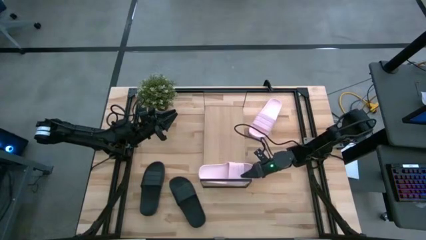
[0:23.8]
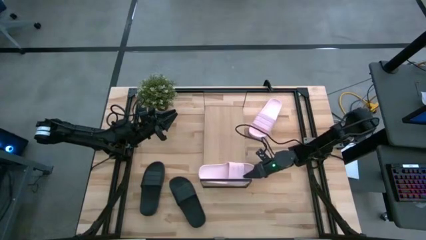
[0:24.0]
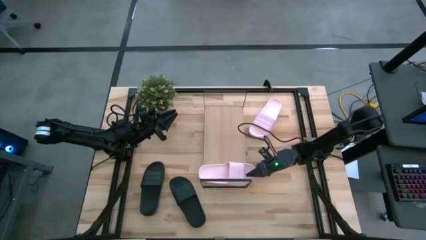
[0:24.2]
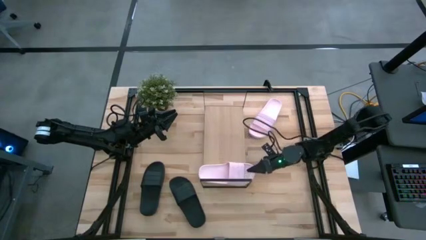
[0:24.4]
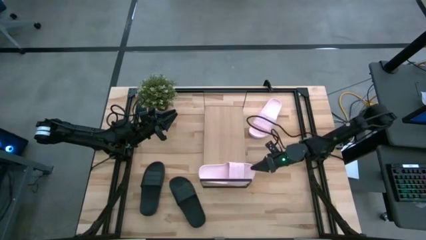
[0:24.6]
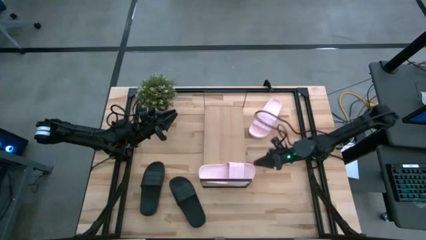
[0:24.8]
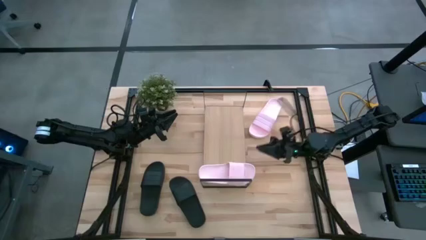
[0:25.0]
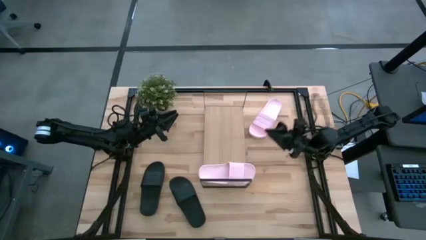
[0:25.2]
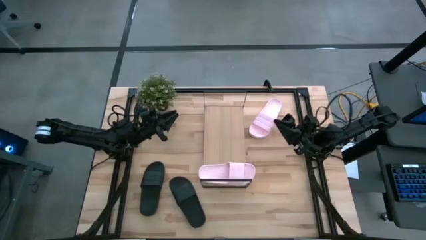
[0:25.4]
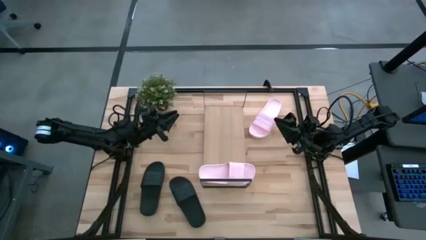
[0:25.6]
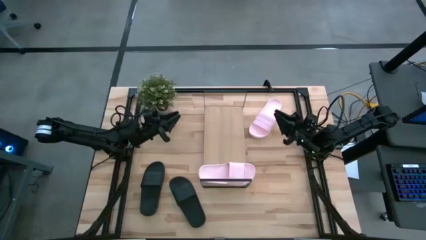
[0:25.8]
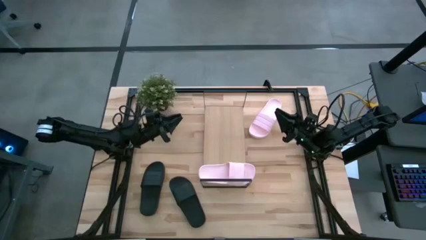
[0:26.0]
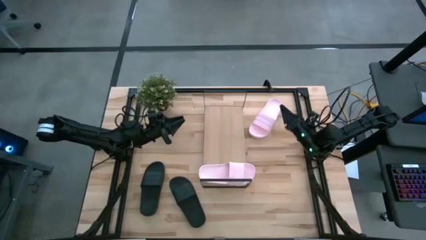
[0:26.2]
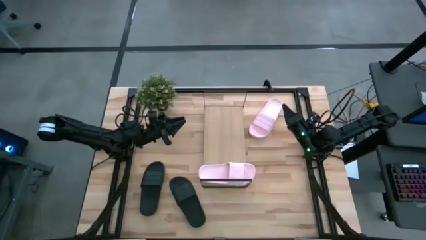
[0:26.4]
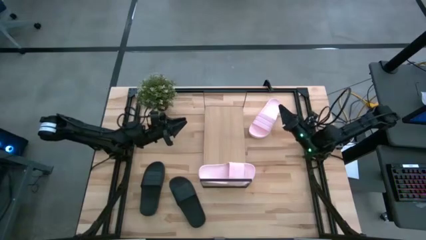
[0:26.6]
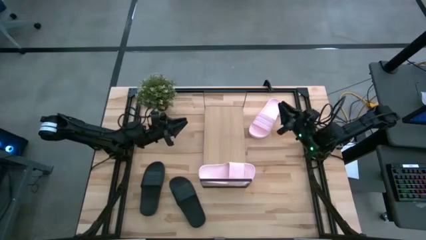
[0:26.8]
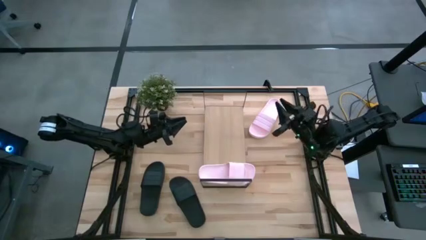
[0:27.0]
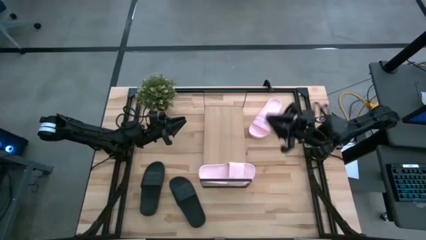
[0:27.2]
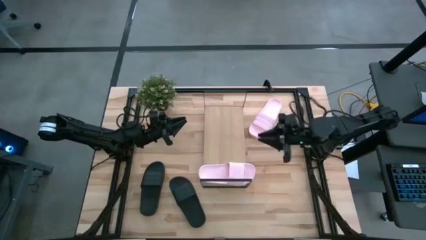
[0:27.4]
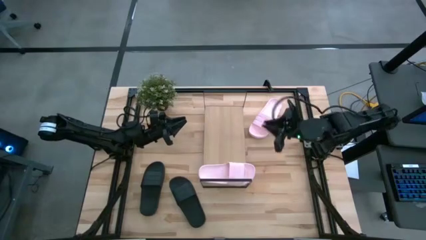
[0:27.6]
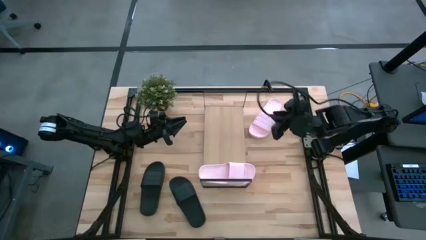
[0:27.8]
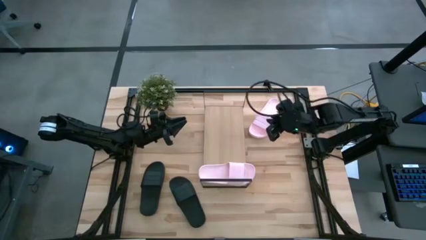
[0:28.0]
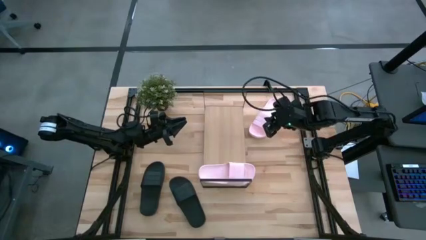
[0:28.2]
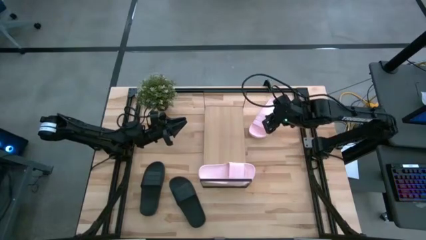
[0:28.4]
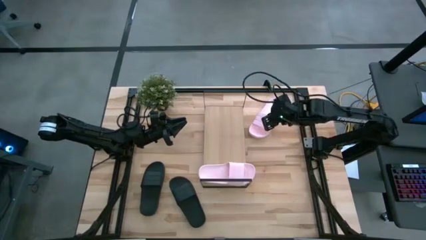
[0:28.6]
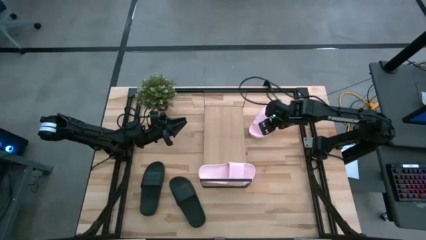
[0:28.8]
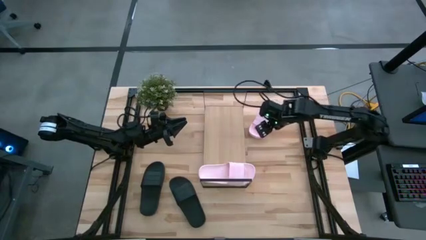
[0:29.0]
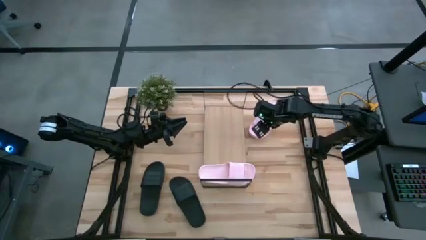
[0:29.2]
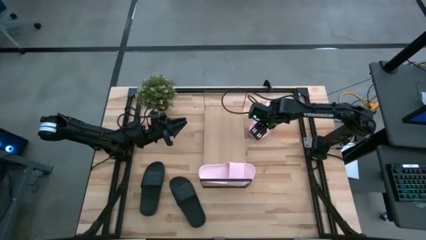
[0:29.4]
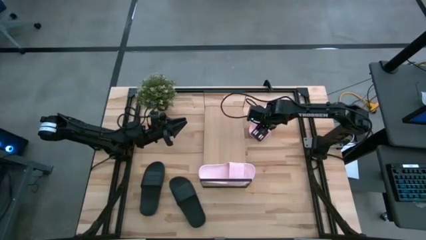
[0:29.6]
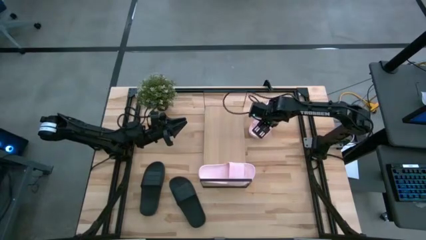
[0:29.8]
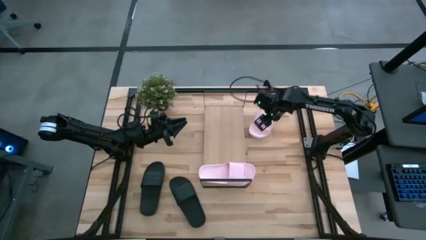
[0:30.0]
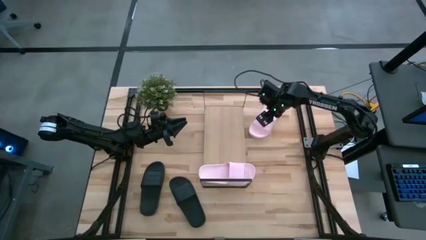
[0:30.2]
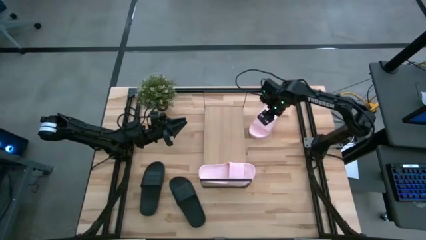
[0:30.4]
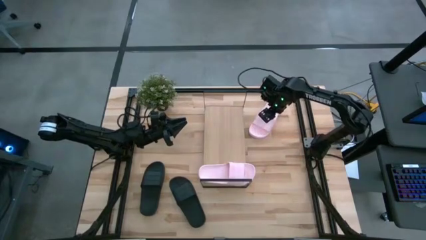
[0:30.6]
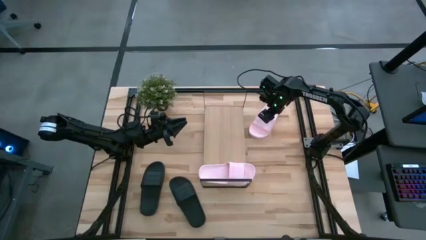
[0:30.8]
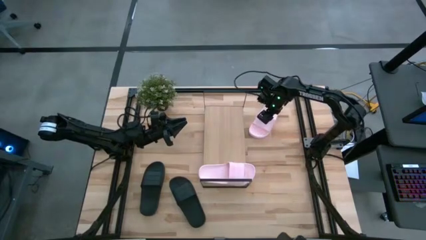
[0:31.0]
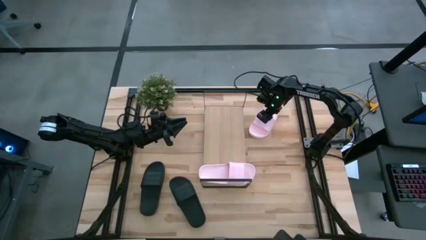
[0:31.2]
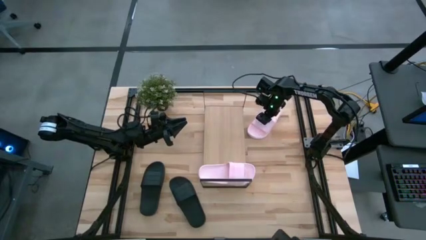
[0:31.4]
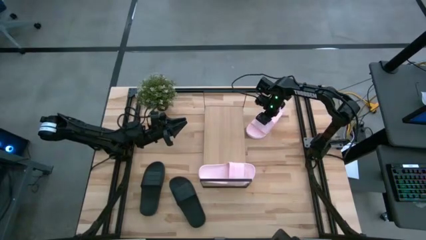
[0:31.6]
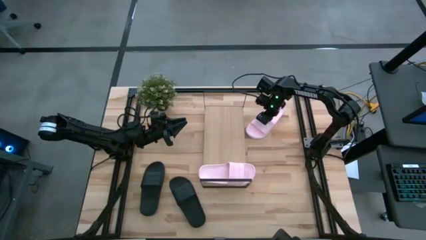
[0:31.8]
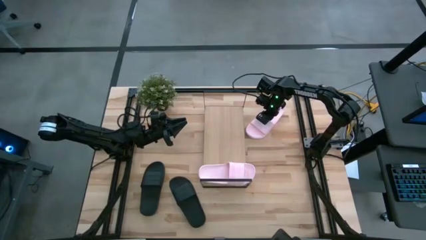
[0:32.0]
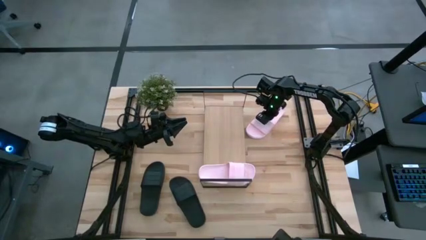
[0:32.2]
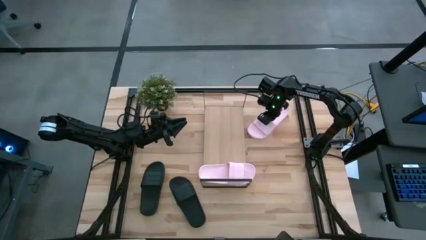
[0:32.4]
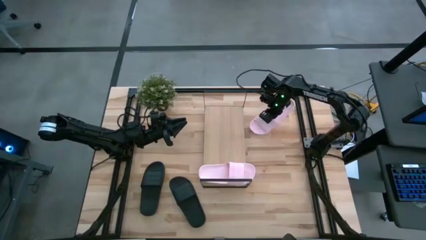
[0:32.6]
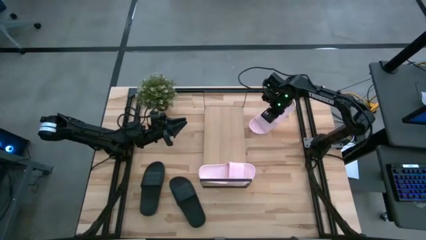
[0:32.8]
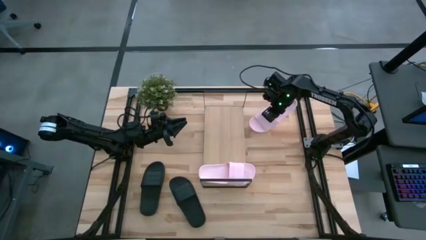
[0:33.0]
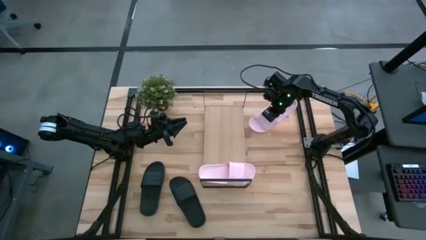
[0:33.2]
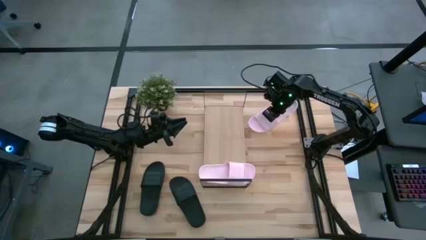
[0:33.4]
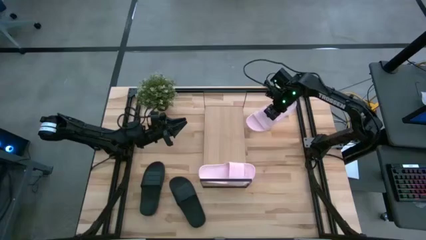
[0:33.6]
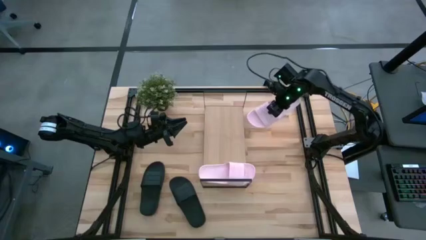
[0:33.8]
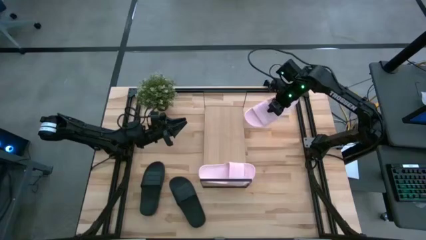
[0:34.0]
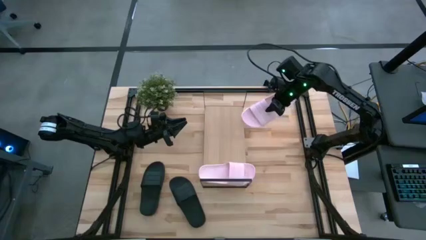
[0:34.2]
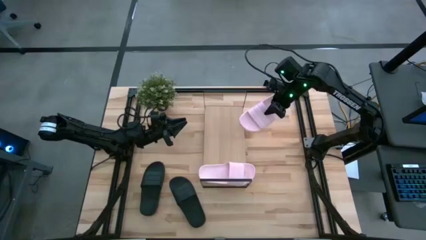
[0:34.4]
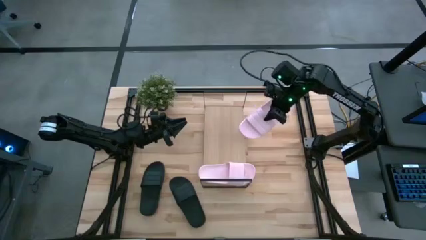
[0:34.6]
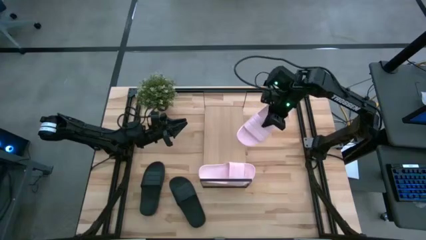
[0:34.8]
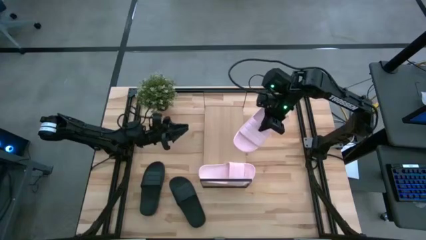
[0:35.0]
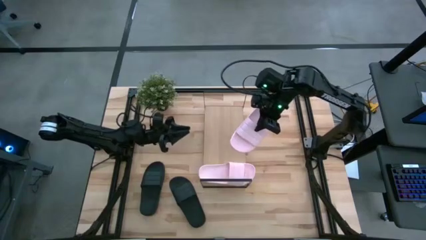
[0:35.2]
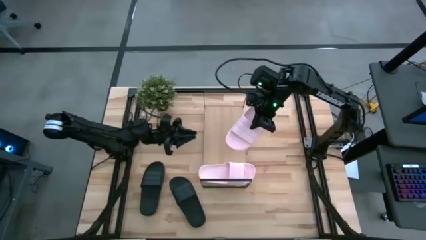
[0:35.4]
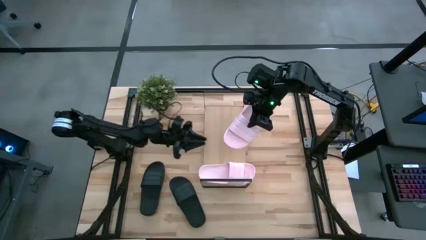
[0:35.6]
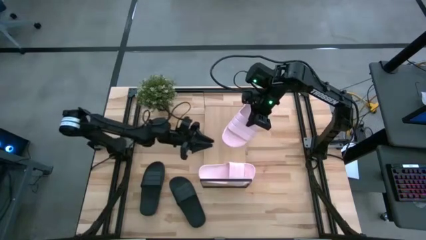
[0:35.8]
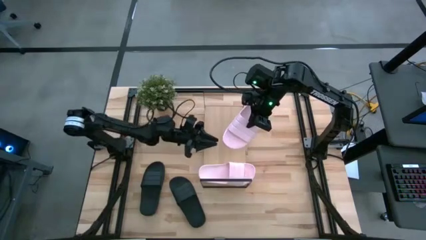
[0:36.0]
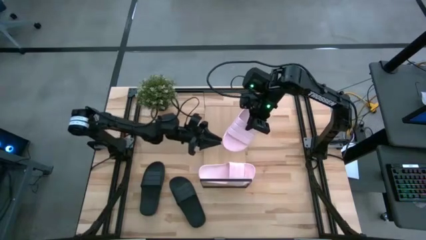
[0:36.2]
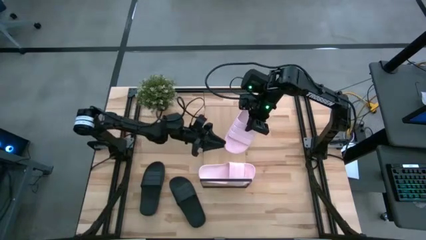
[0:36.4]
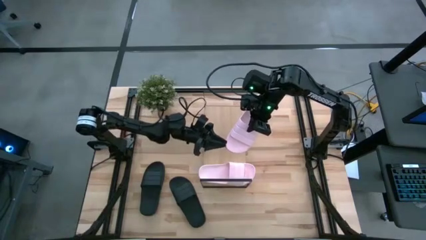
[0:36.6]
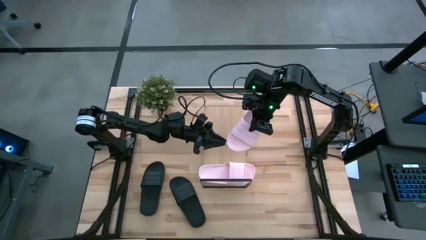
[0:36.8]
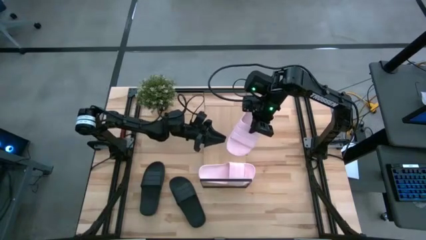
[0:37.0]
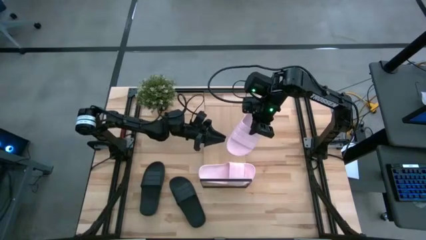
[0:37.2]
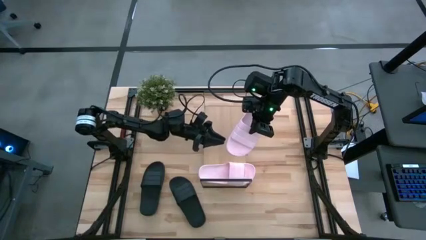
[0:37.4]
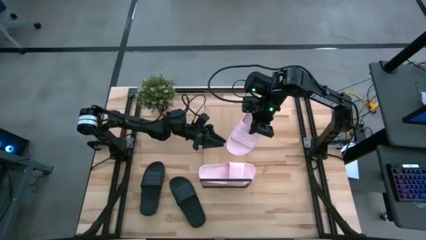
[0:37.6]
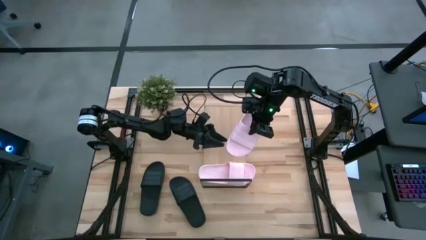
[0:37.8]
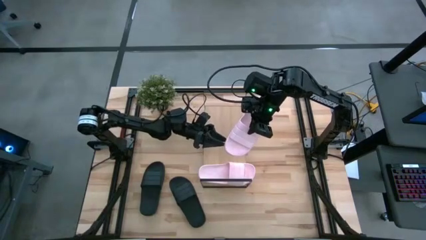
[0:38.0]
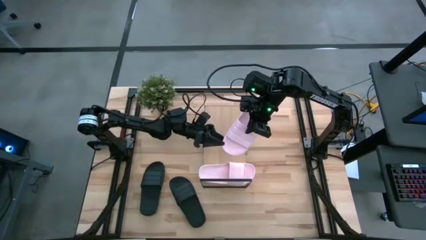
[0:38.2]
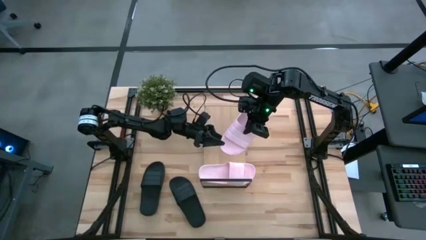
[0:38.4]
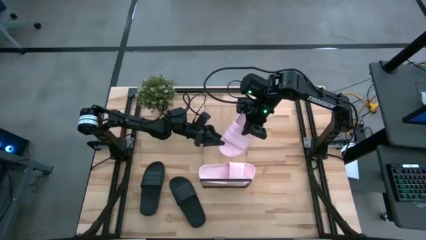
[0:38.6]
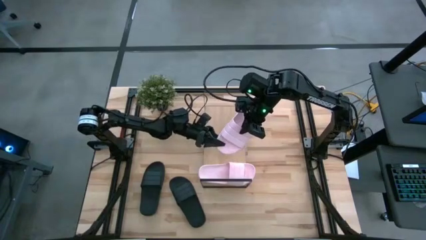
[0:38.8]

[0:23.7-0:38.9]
Task: Pick and place slides into the shelf
Put the pink slide on the shelf
